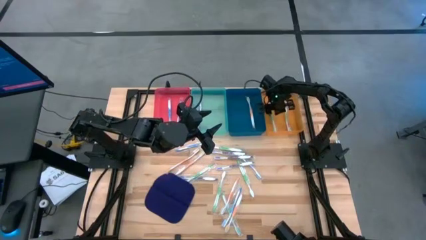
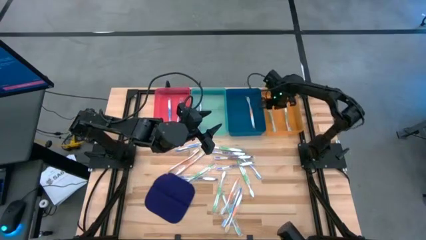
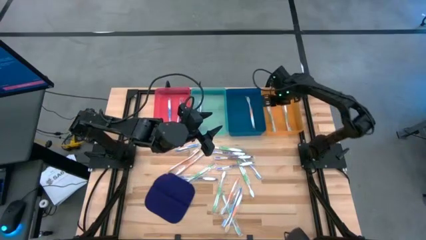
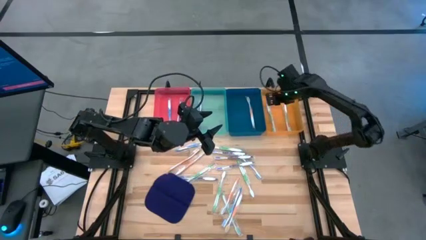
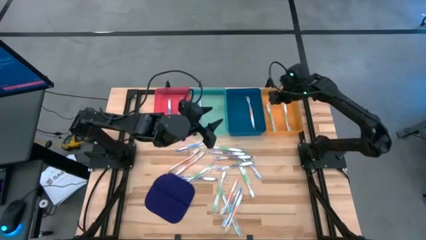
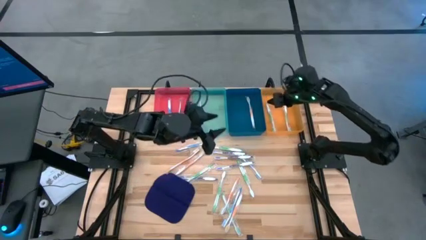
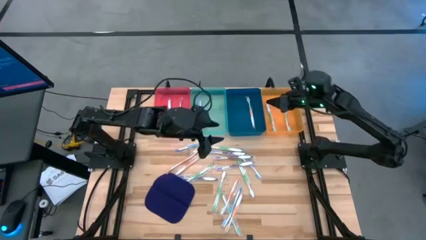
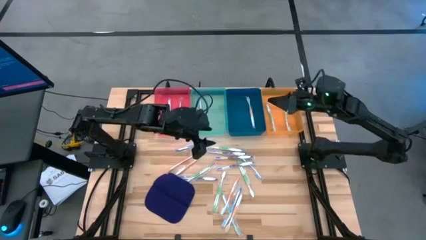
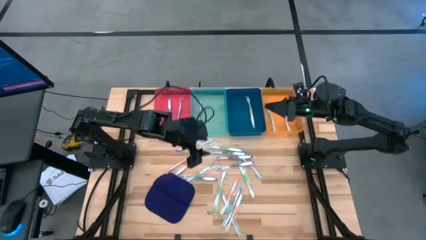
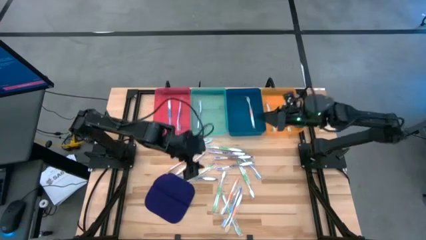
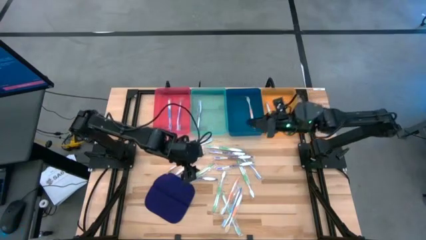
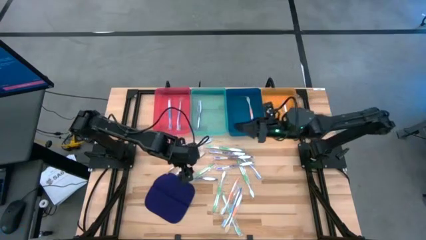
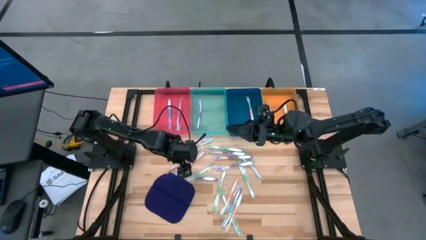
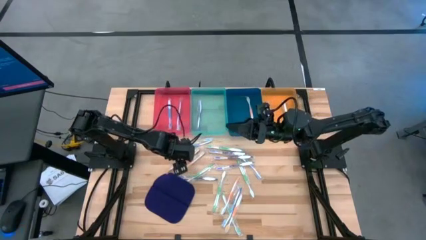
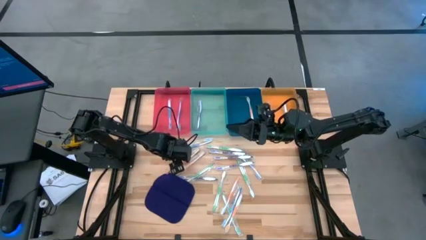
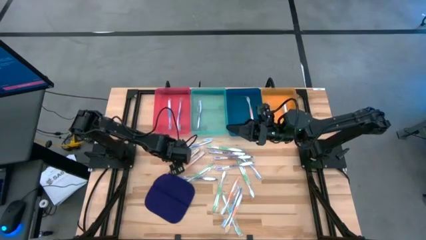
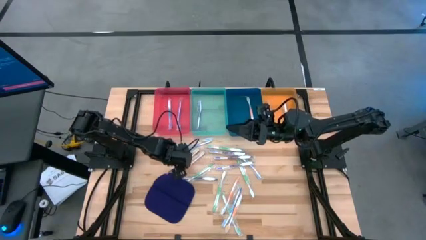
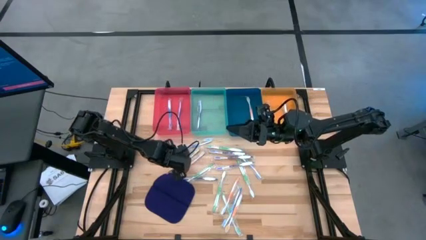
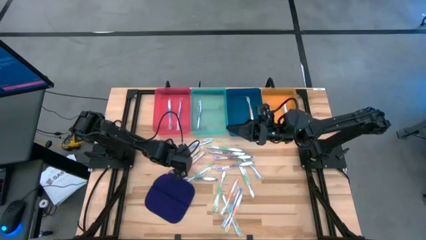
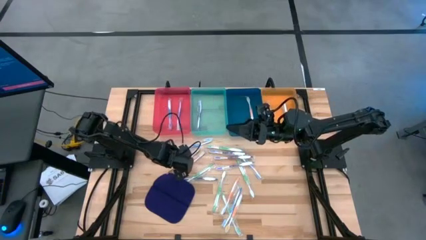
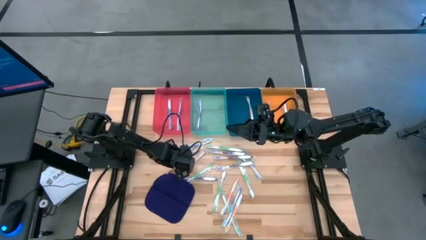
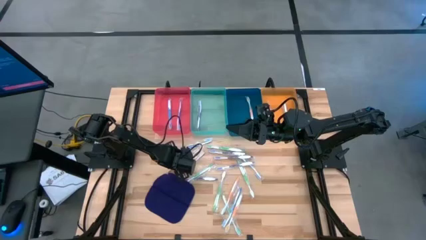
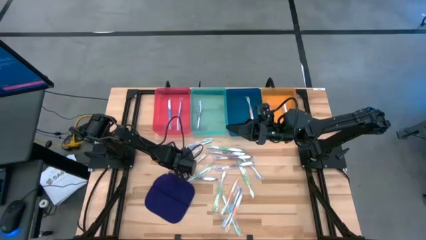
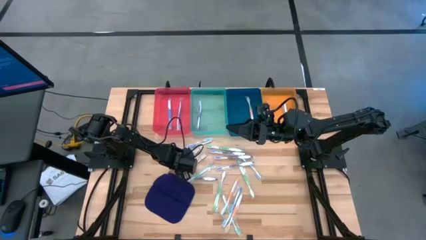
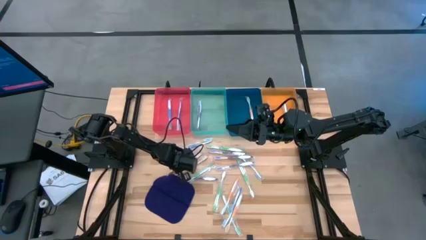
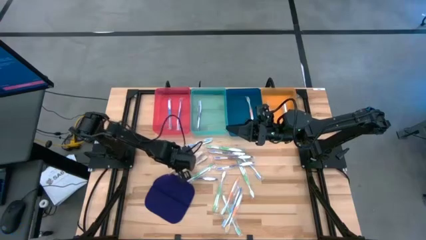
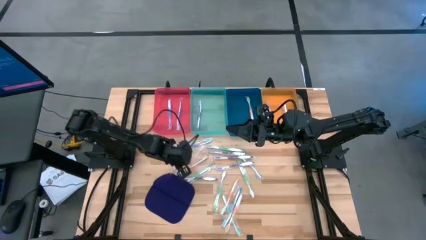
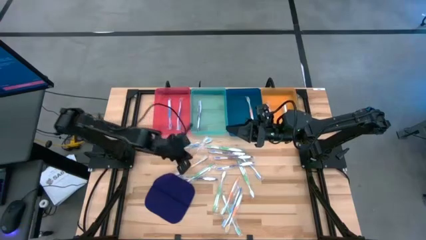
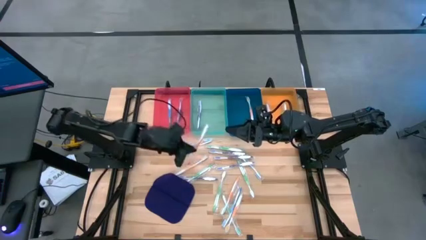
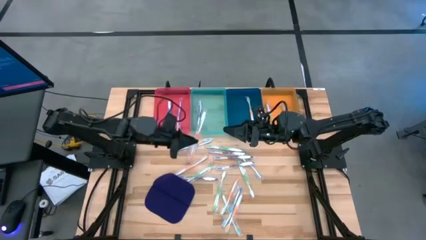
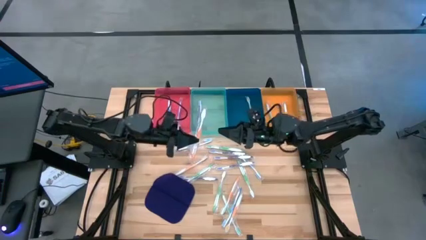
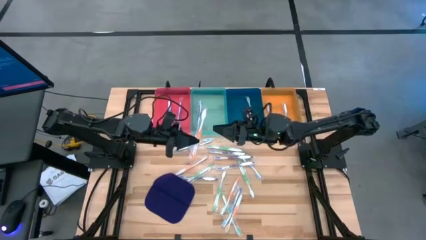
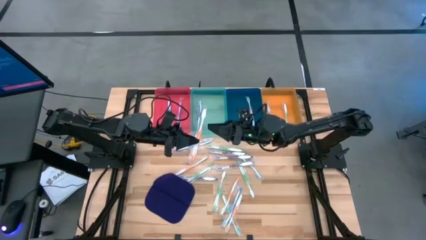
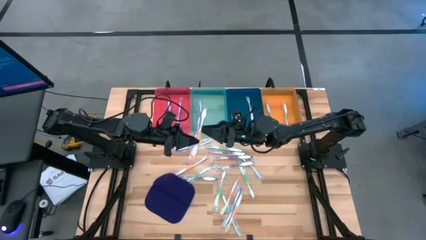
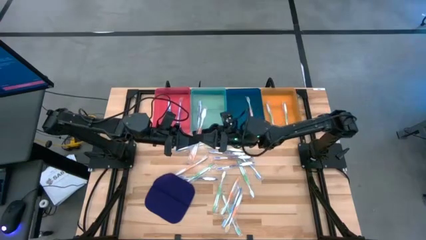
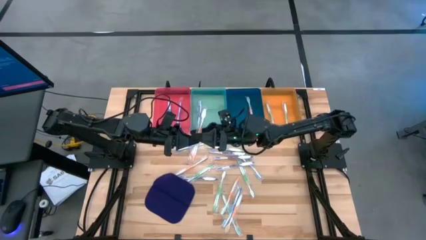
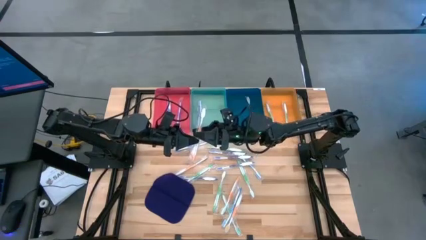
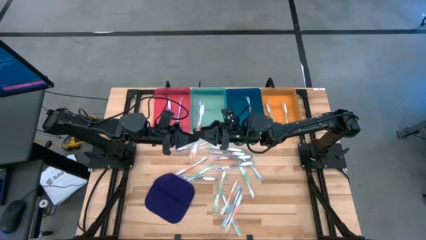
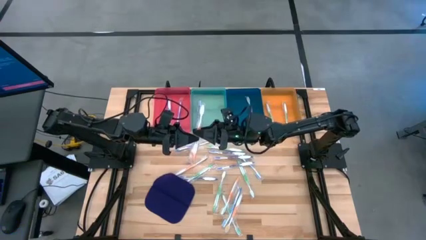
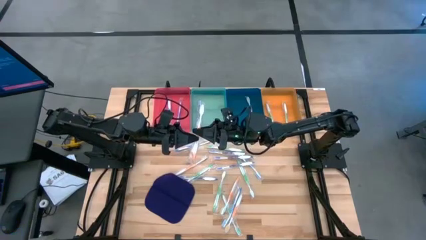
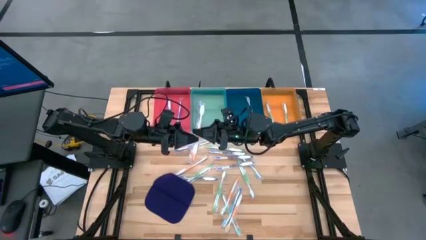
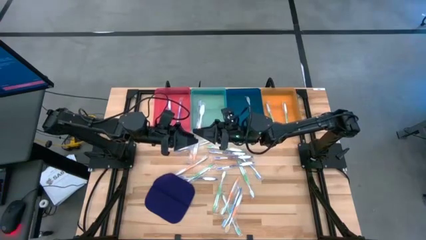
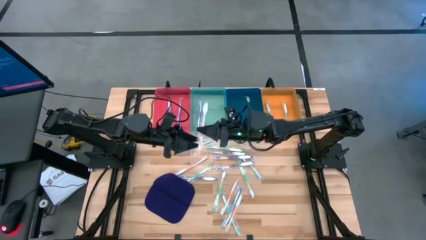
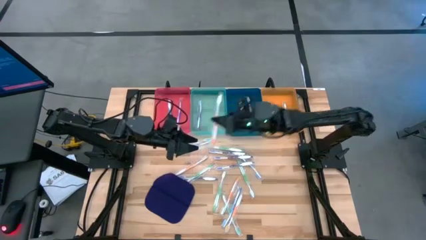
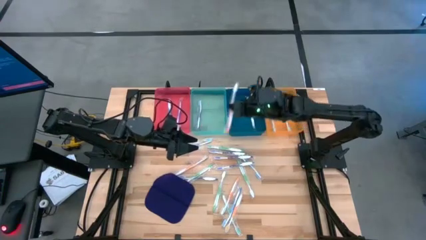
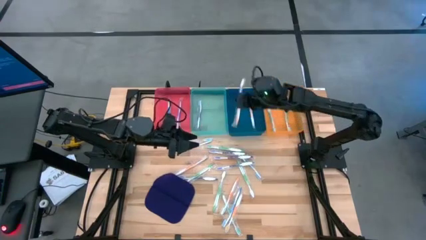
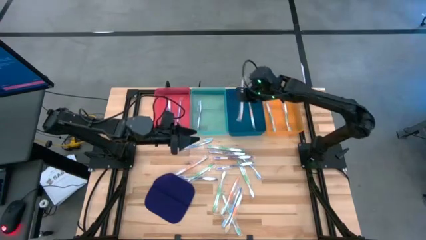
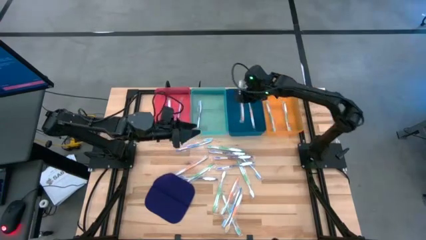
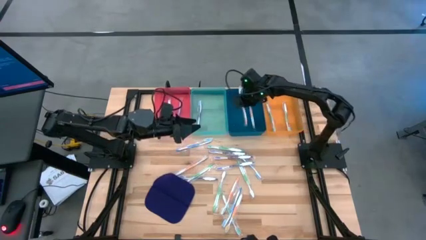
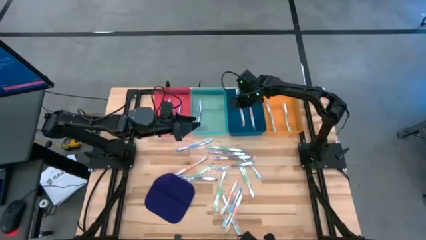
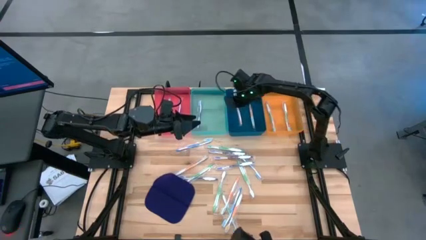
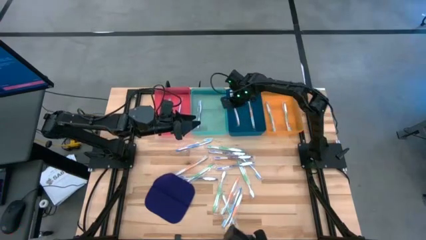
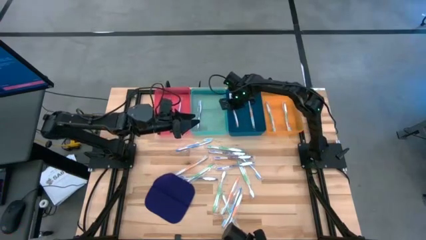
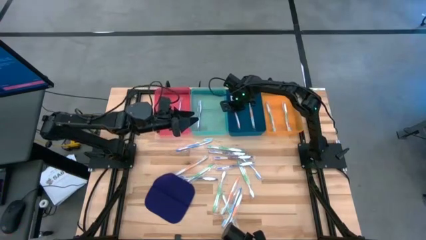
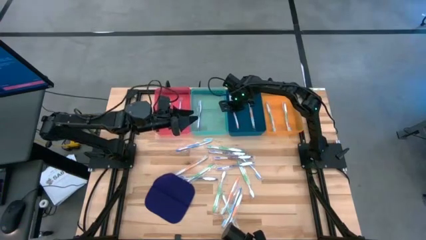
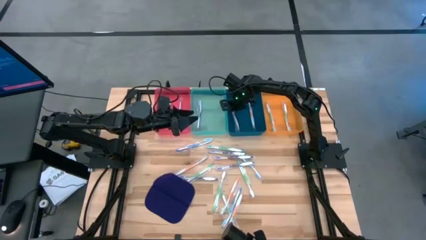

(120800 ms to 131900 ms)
Task: Pick & Place Toothbrushes
Put the orange toothbrush into the blue bin

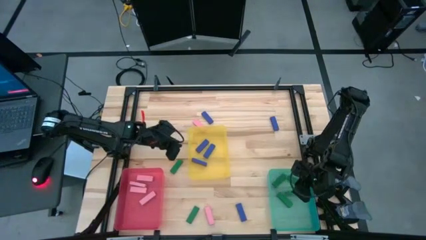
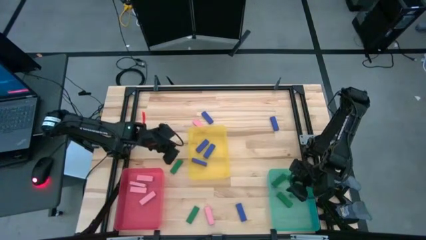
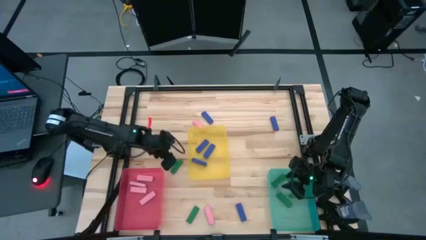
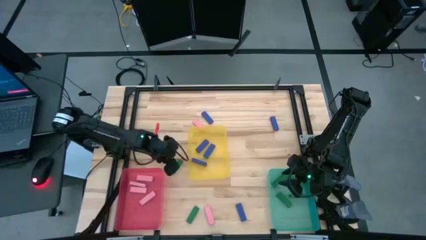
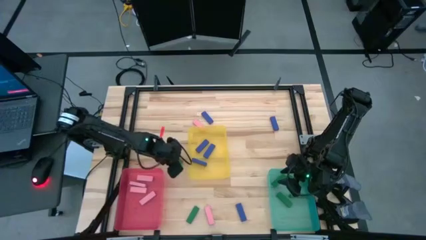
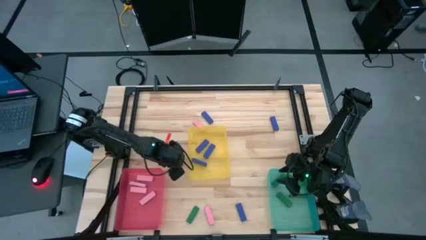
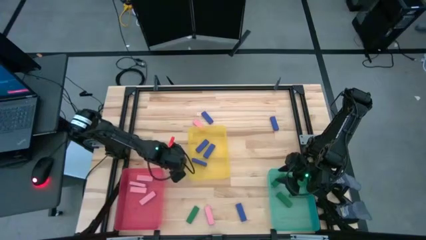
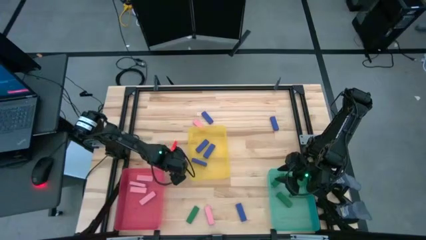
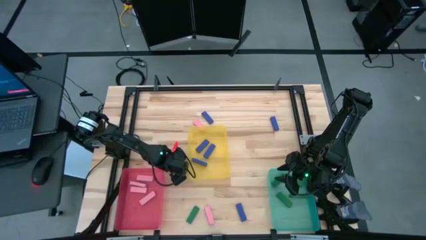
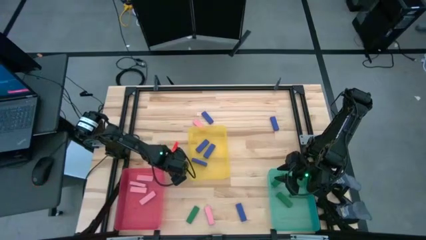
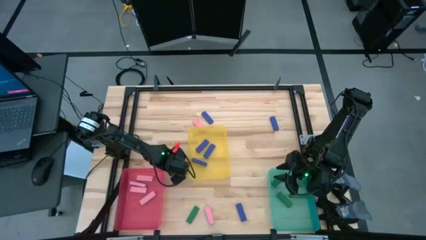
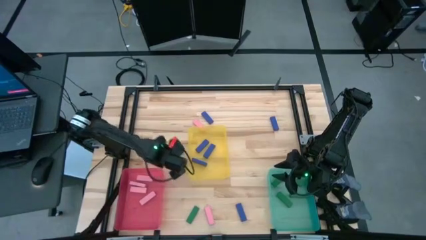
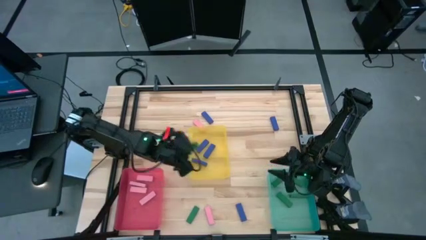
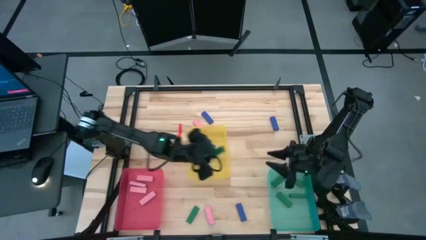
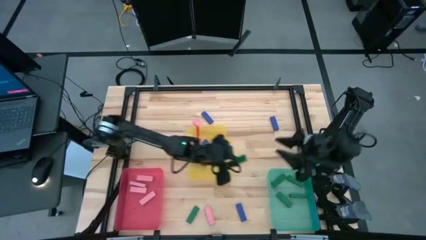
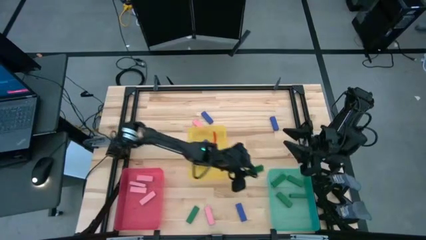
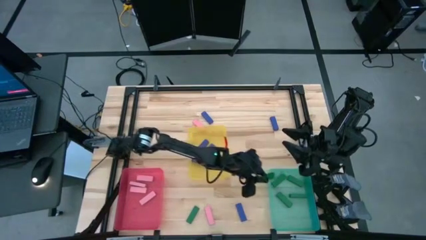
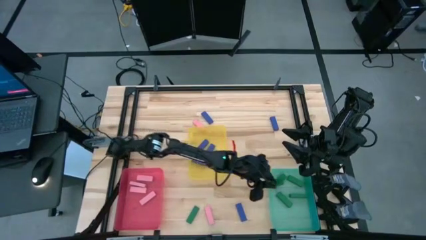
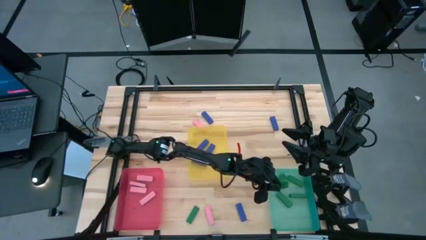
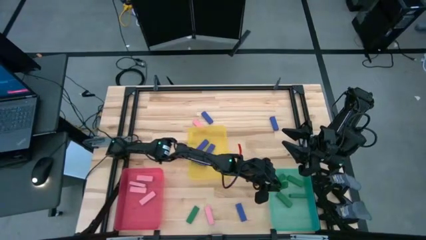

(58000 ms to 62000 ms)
Task: Sort blocks
Put the top green block into the blue bin
